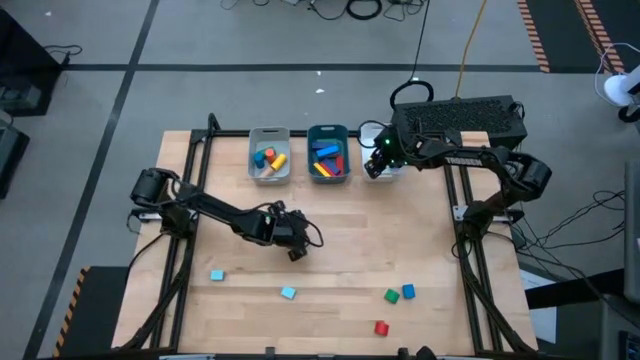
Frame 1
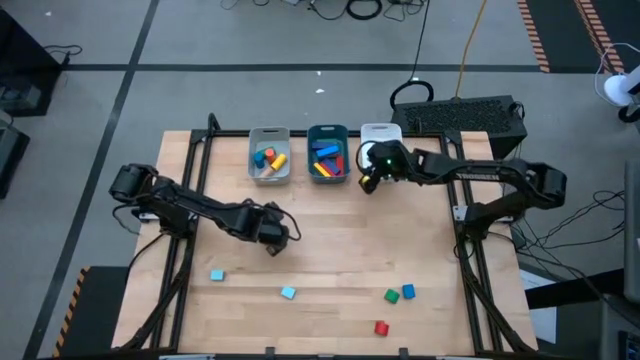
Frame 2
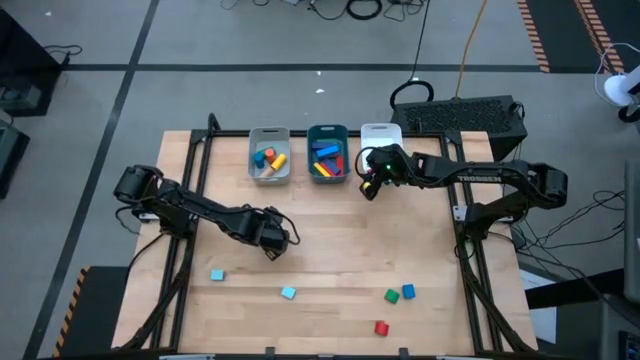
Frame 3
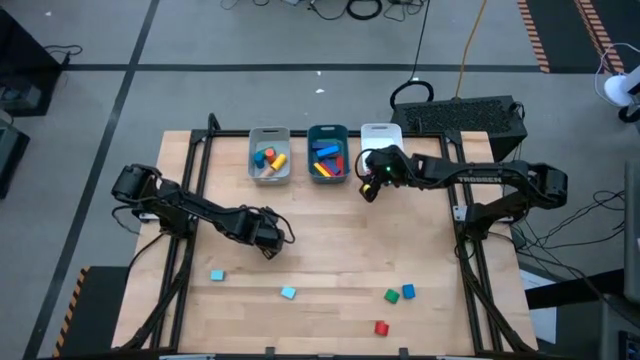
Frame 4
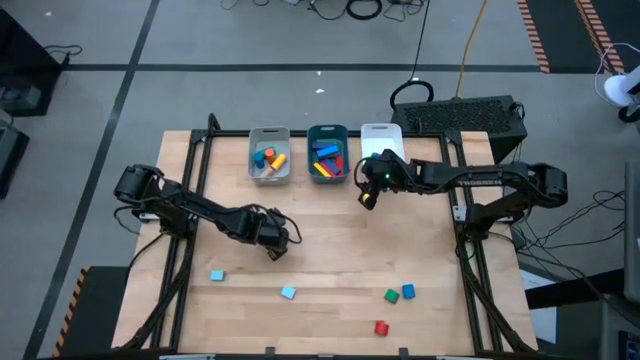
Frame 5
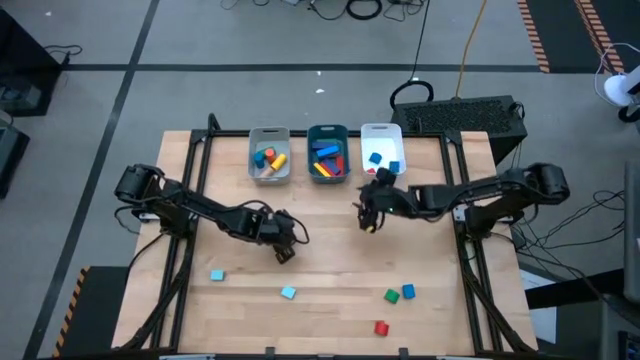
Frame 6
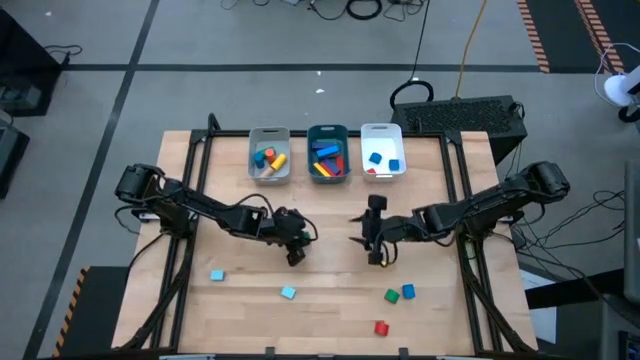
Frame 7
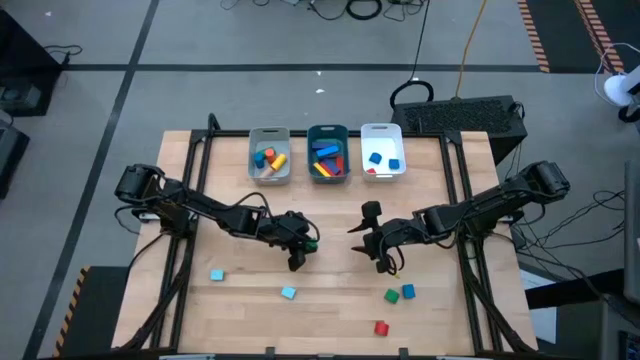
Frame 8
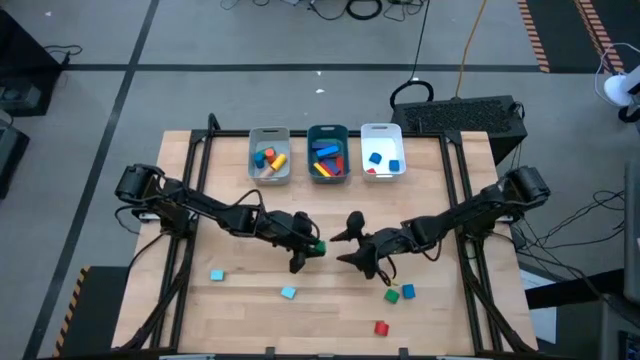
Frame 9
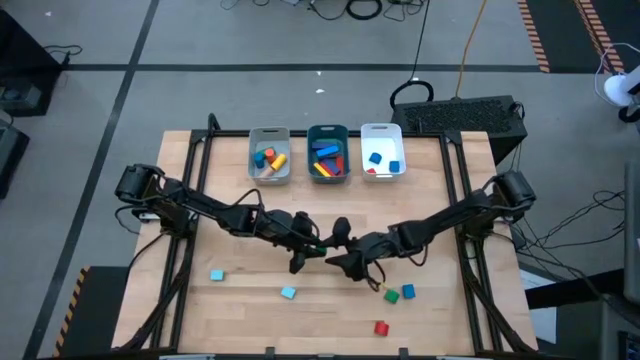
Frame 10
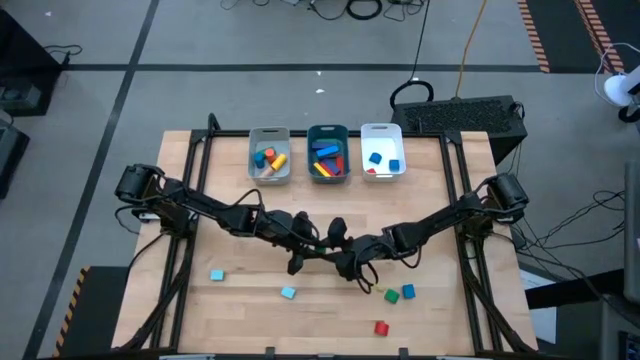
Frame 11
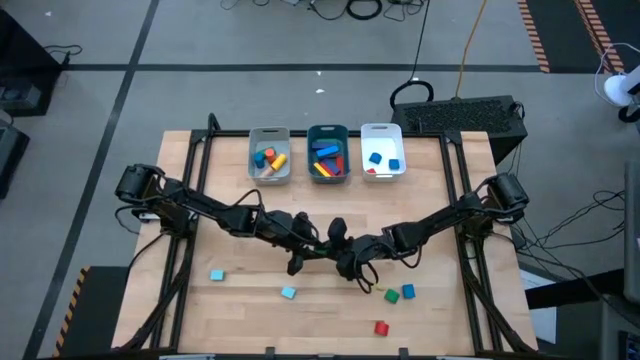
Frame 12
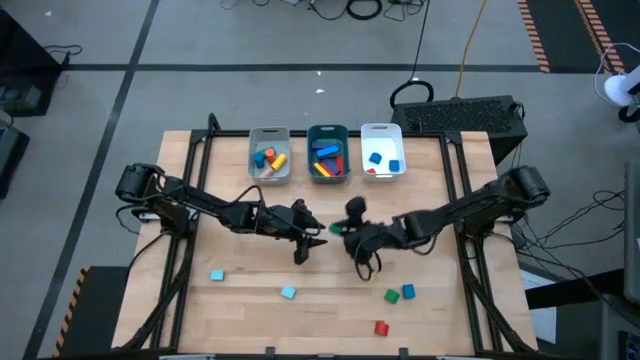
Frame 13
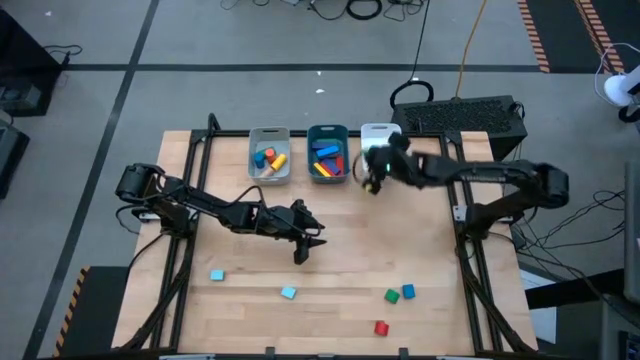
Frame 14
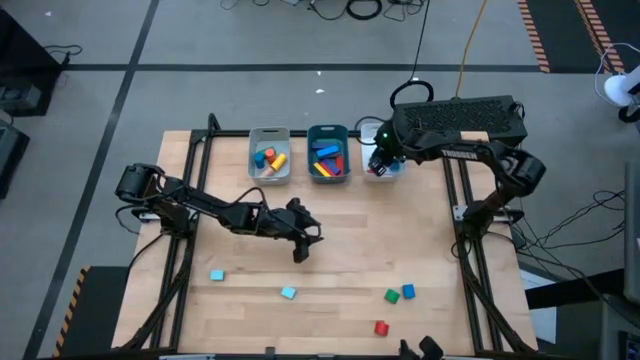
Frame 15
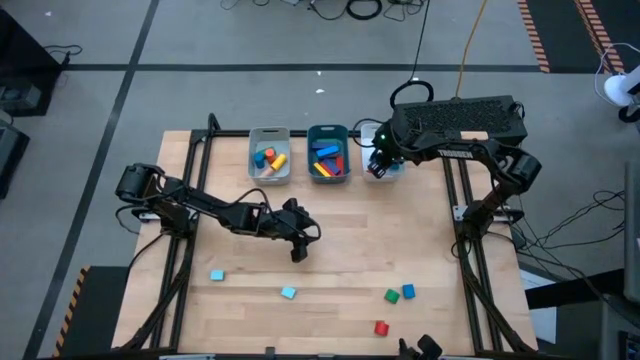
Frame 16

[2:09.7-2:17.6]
Task: Sort blocks by size
Put the top green half-circle block into the white bin

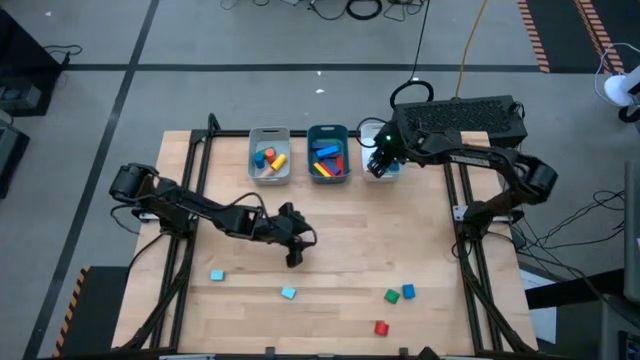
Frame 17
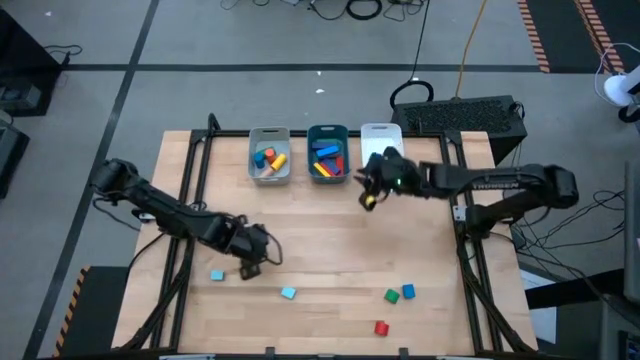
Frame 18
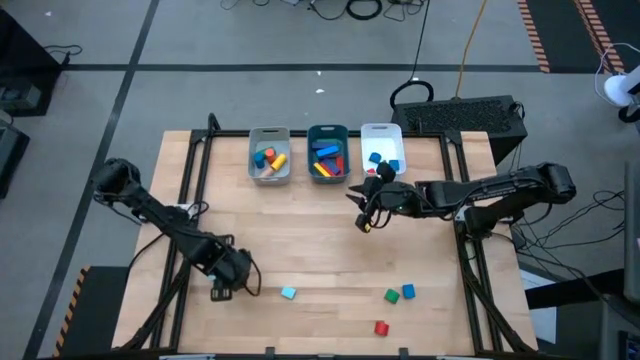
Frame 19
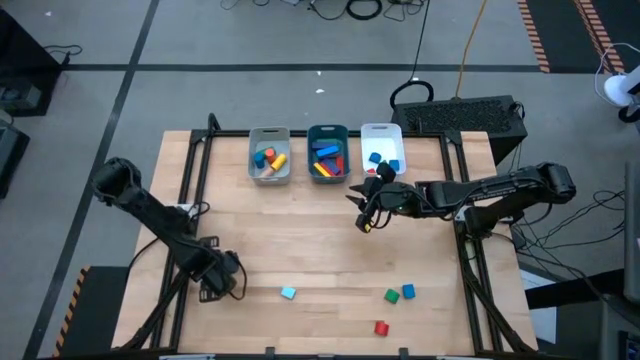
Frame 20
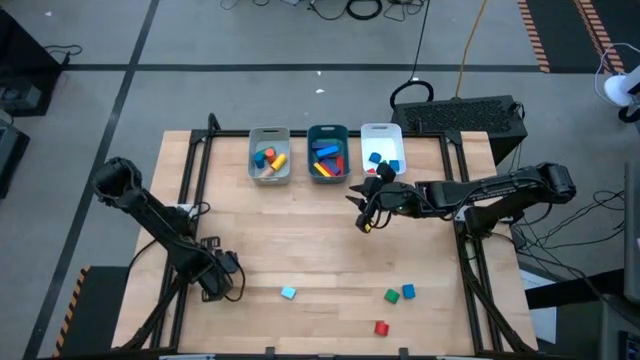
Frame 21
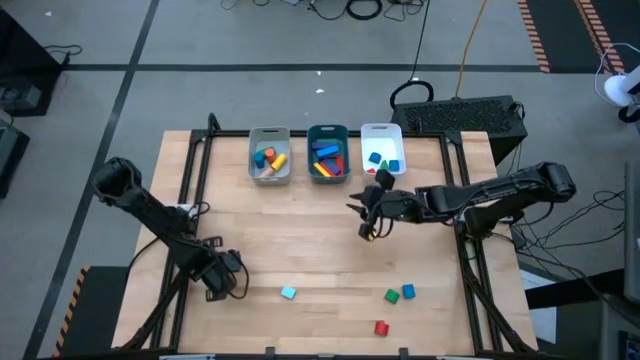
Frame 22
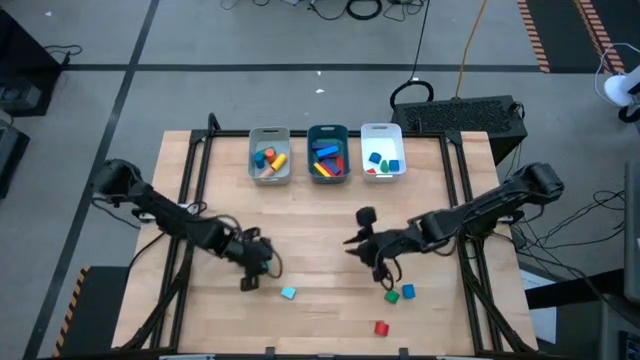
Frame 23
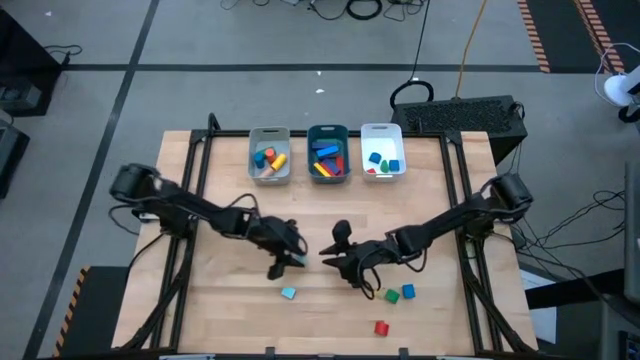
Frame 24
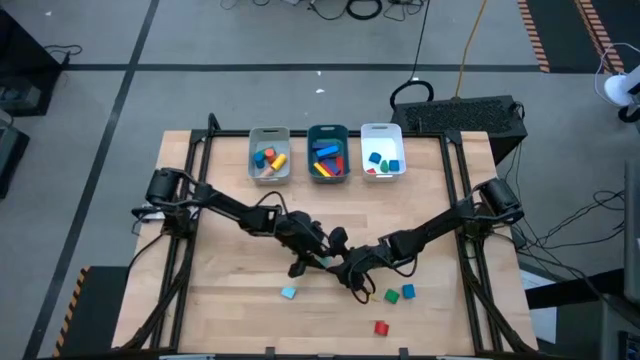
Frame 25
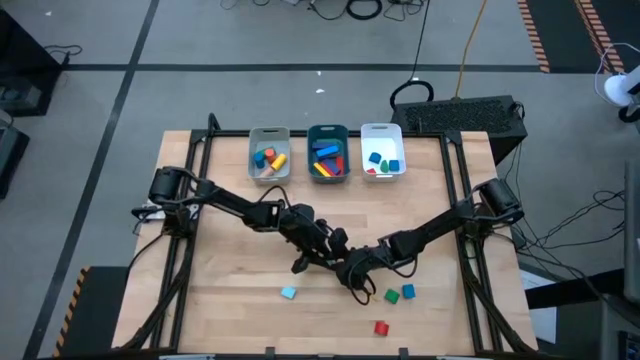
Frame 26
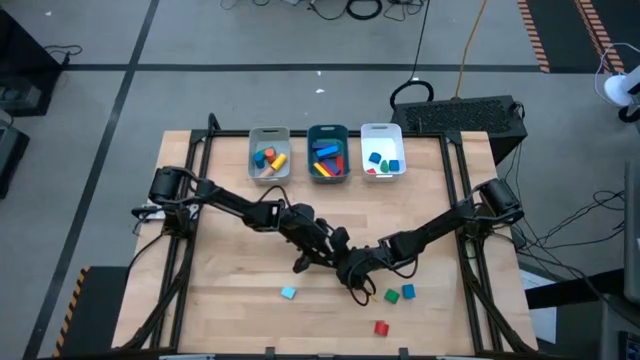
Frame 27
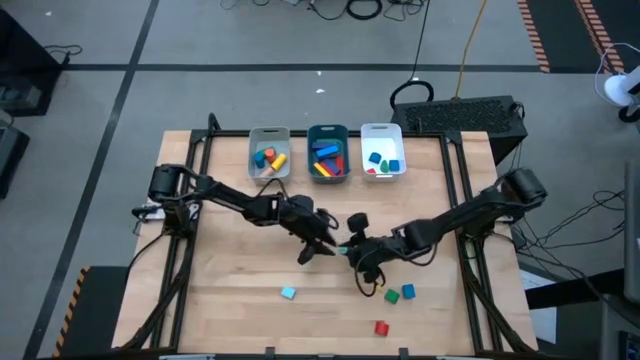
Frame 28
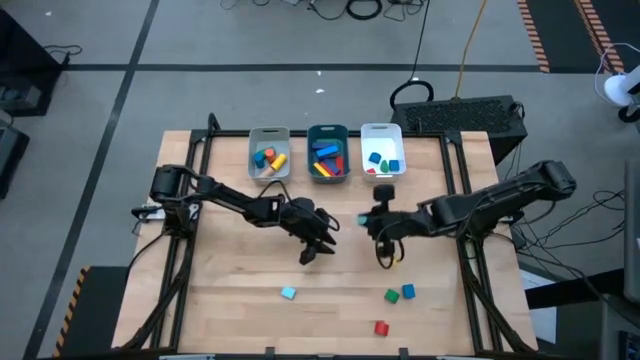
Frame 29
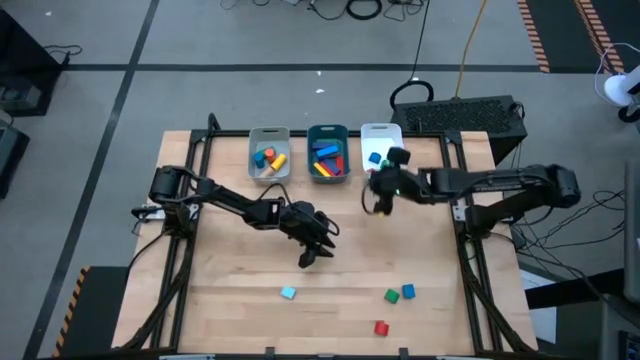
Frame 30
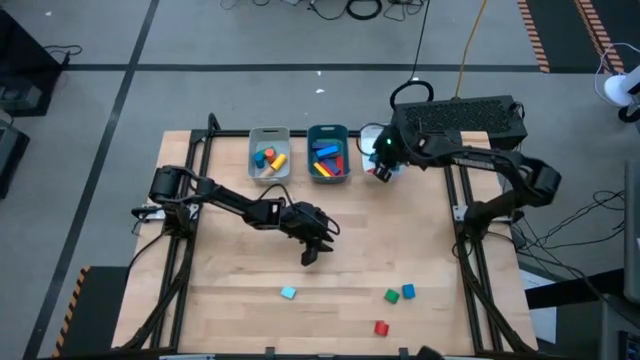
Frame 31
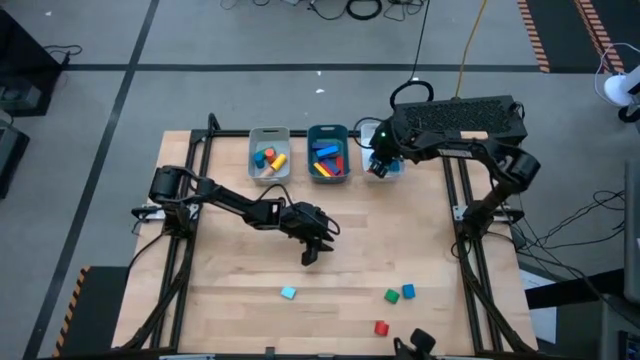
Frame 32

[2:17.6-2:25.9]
Put the left light blue half-circle block into the white bin

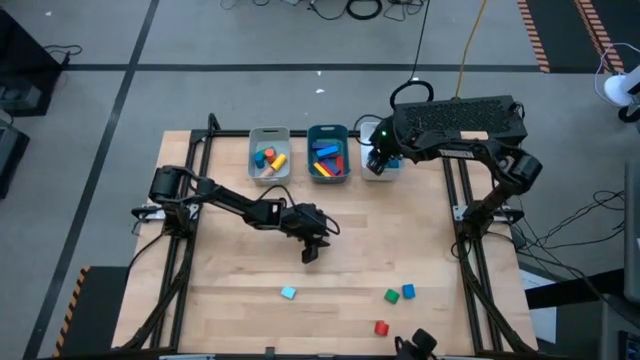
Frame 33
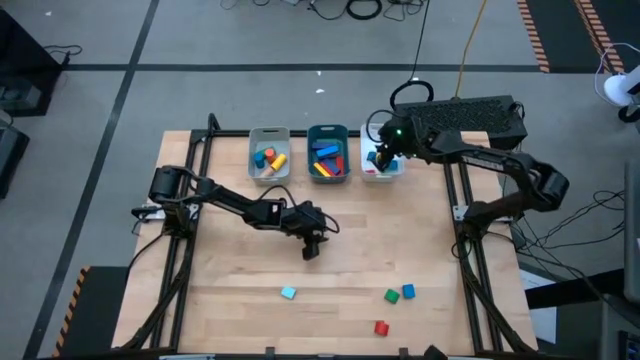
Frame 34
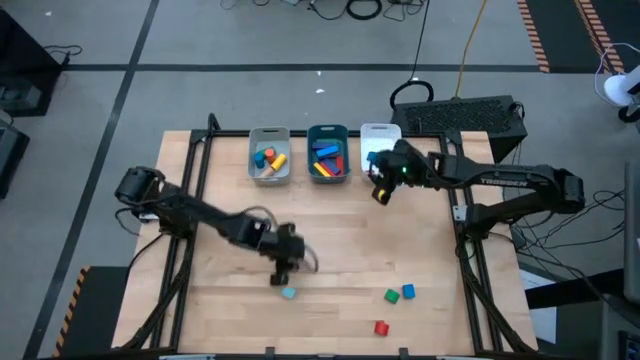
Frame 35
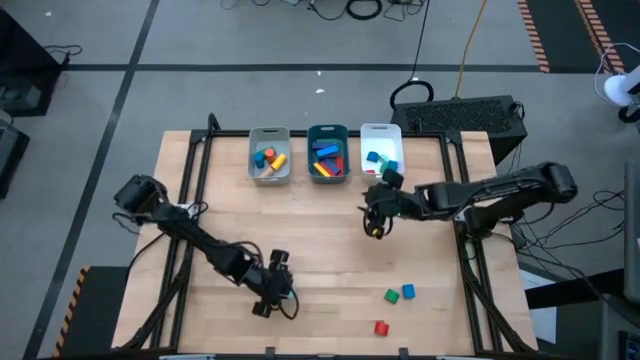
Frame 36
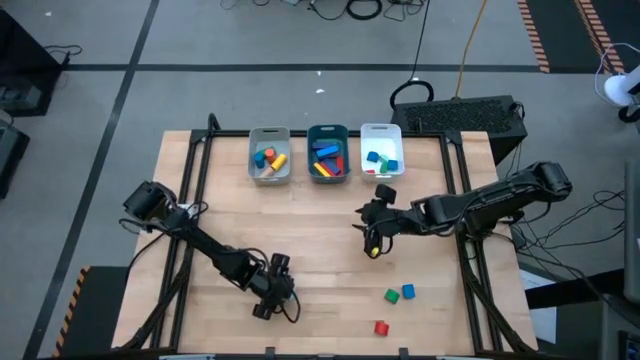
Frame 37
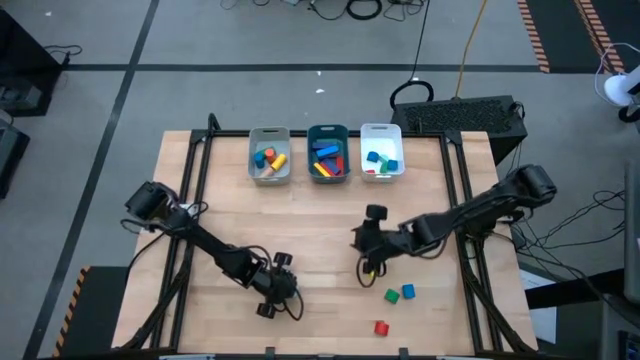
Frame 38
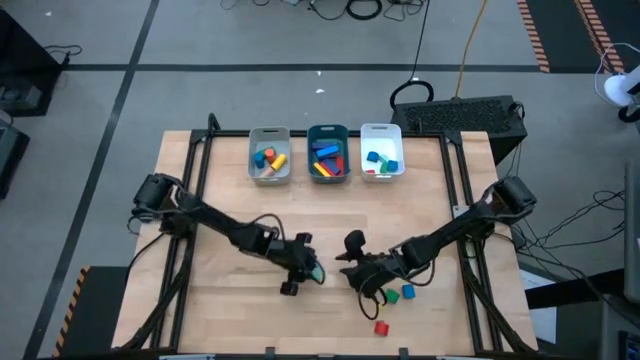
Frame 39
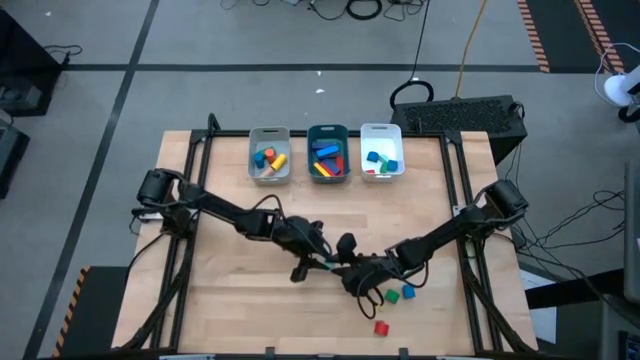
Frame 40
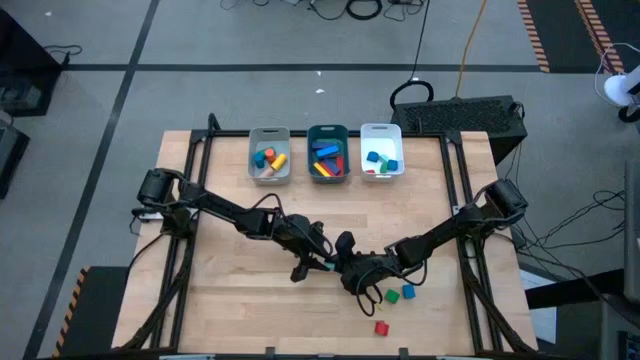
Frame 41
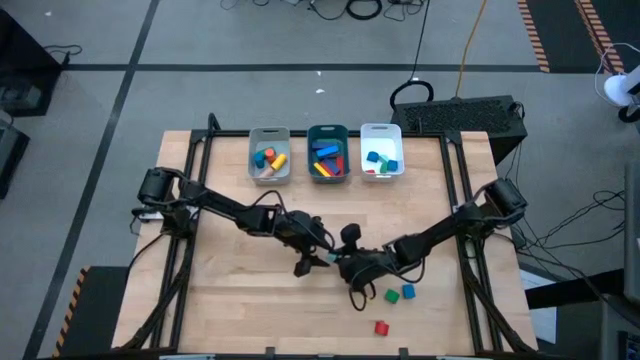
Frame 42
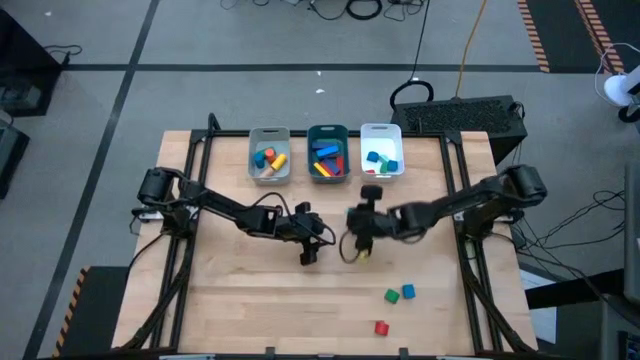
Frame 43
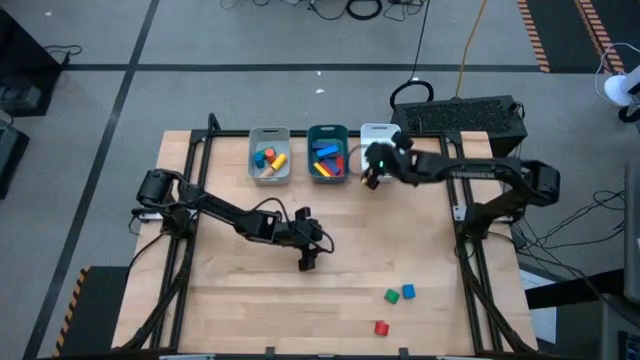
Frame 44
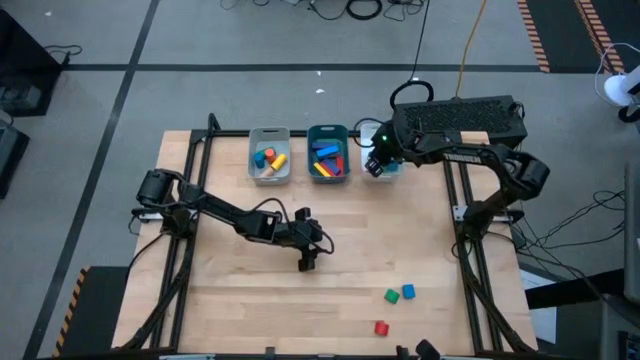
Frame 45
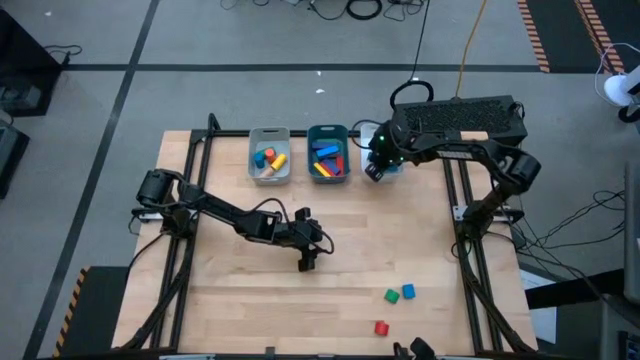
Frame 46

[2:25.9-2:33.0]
Put the light blue half-circle block into the white bin
